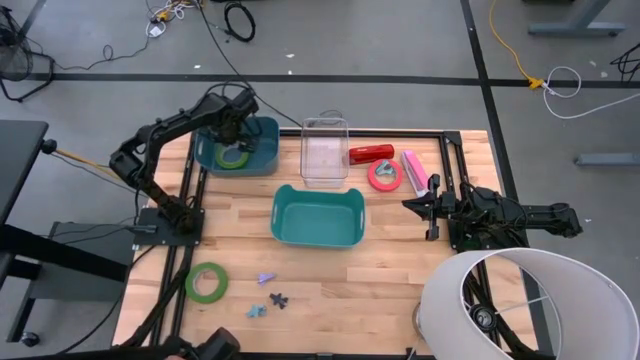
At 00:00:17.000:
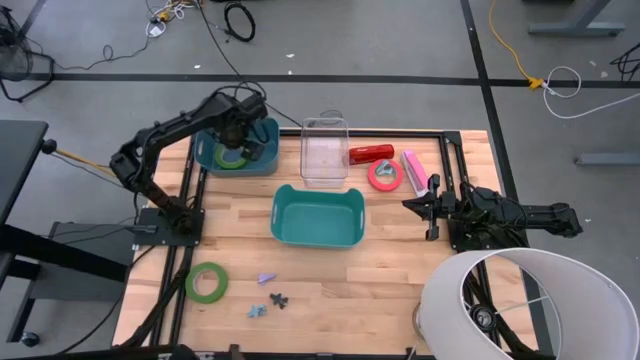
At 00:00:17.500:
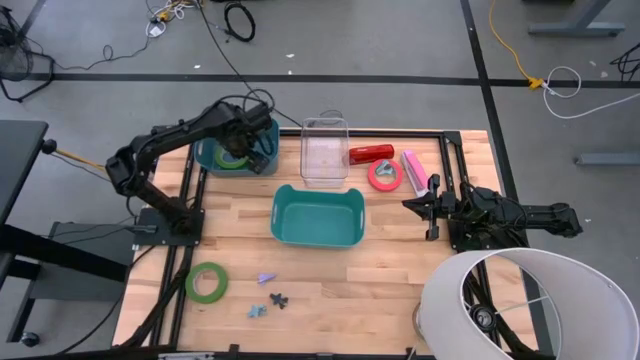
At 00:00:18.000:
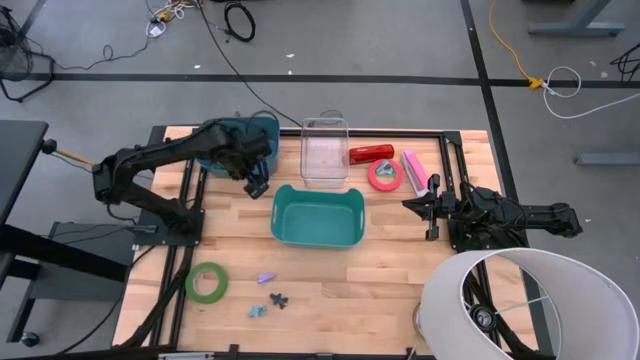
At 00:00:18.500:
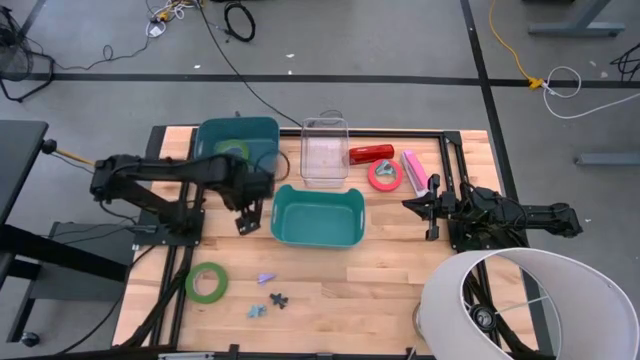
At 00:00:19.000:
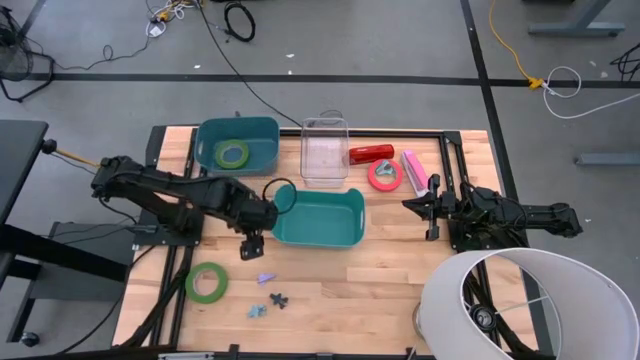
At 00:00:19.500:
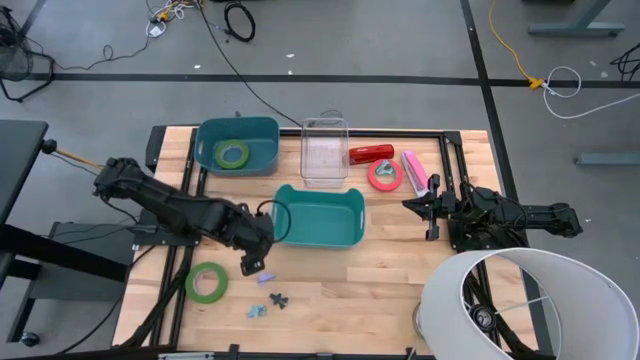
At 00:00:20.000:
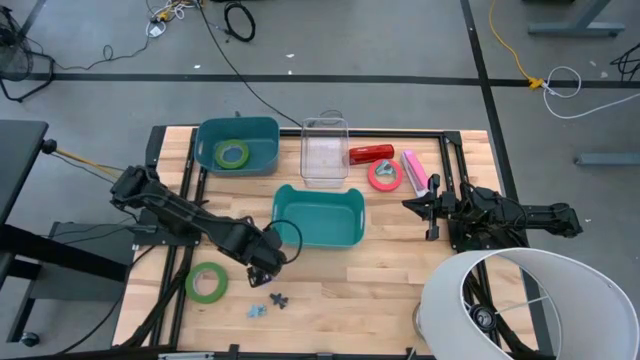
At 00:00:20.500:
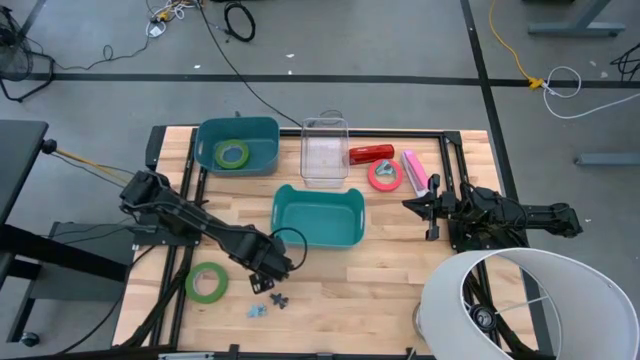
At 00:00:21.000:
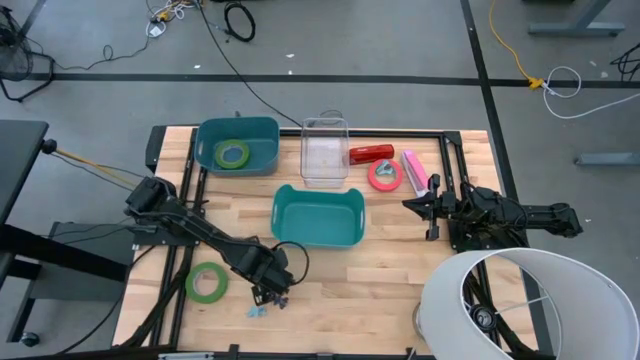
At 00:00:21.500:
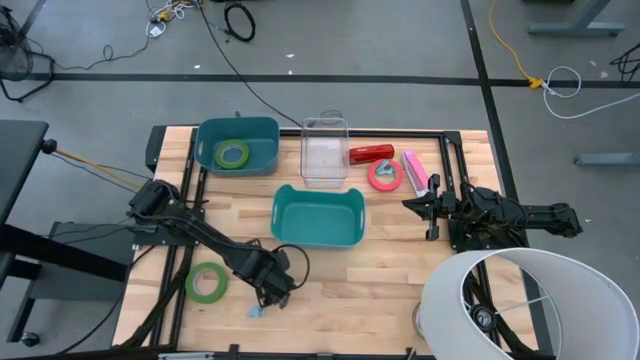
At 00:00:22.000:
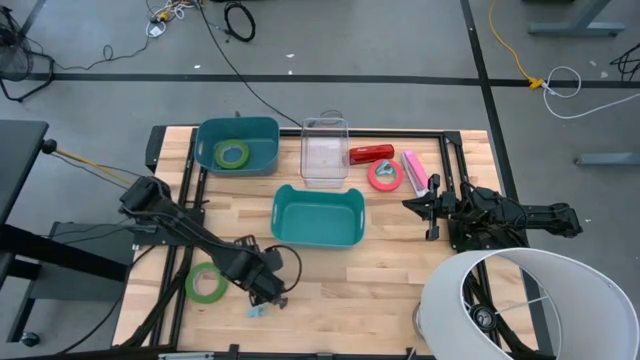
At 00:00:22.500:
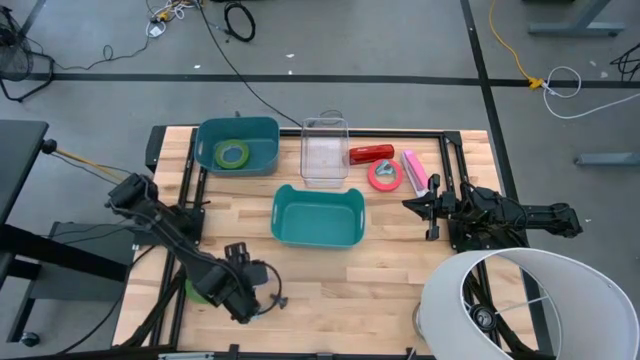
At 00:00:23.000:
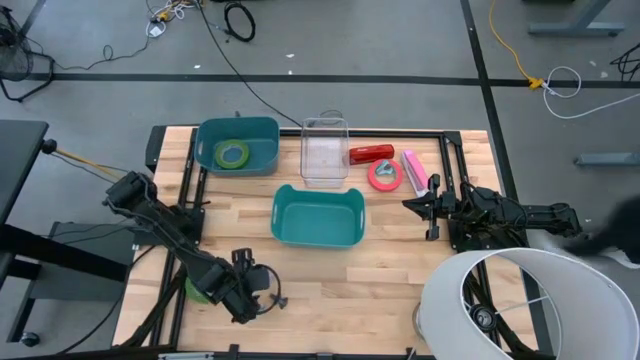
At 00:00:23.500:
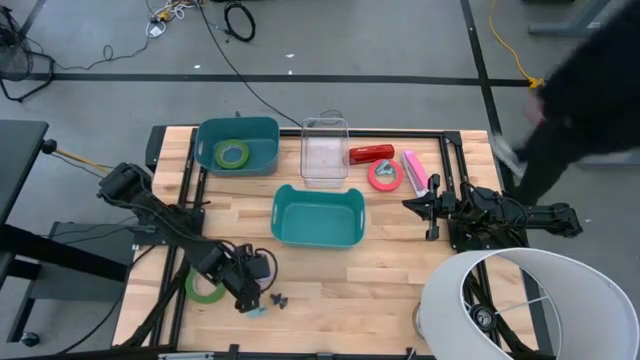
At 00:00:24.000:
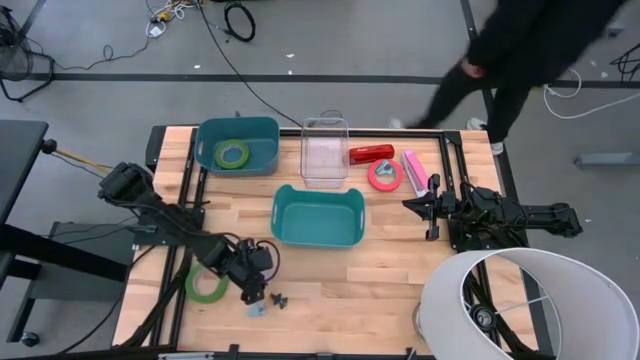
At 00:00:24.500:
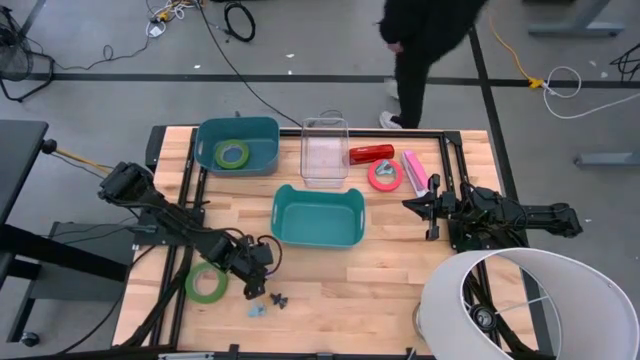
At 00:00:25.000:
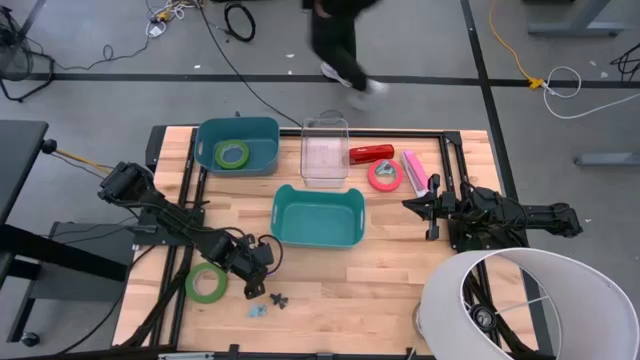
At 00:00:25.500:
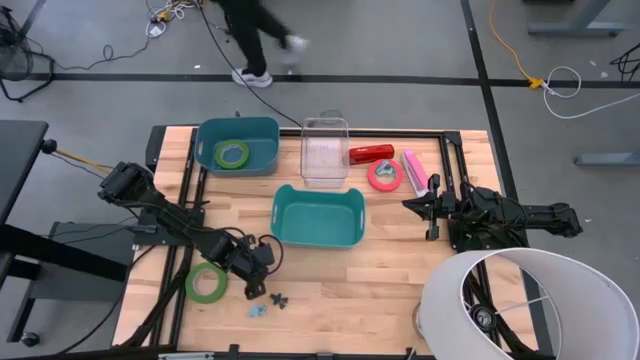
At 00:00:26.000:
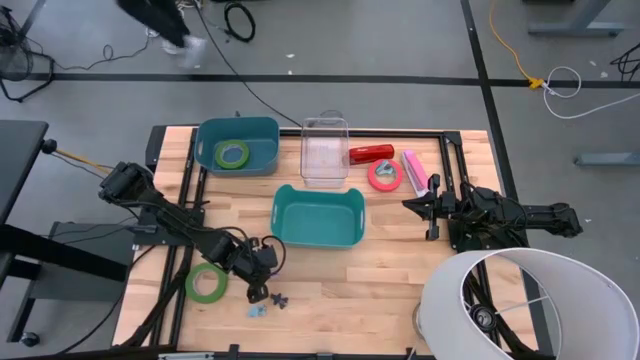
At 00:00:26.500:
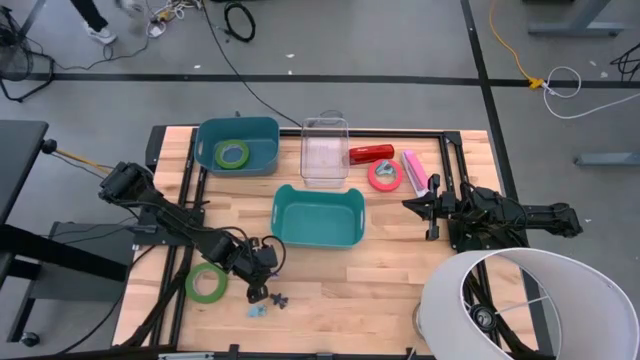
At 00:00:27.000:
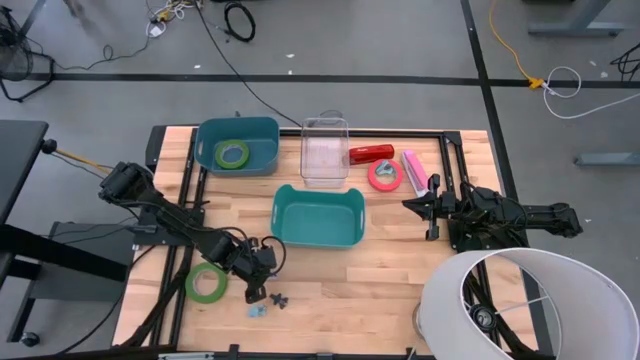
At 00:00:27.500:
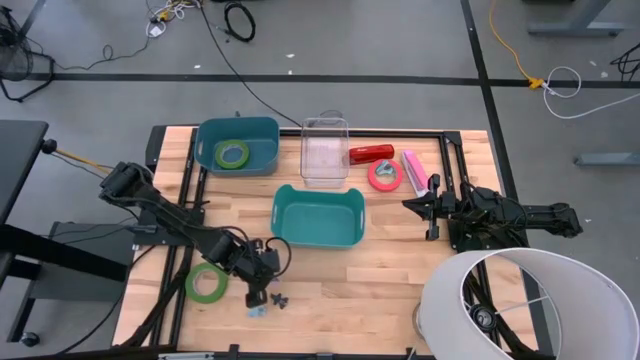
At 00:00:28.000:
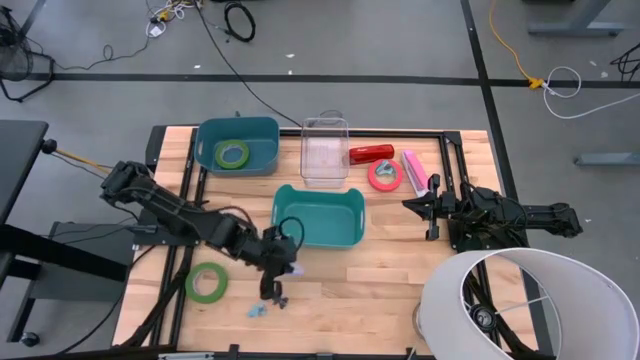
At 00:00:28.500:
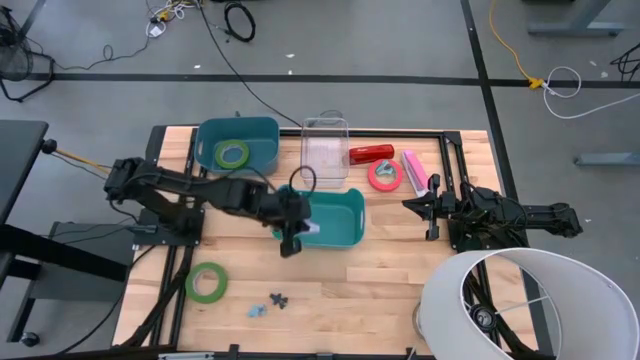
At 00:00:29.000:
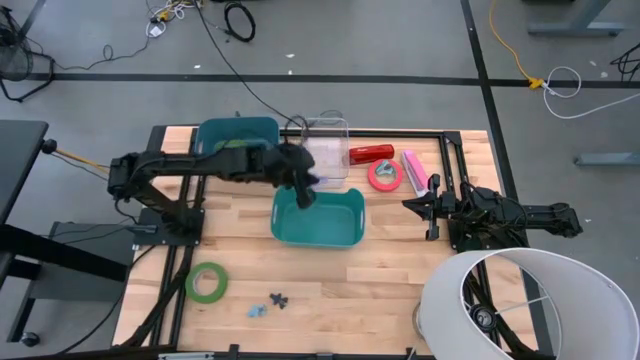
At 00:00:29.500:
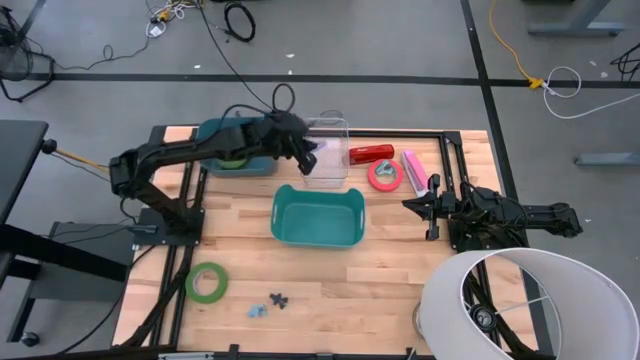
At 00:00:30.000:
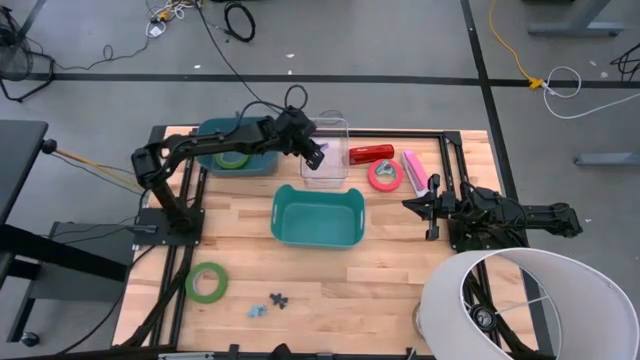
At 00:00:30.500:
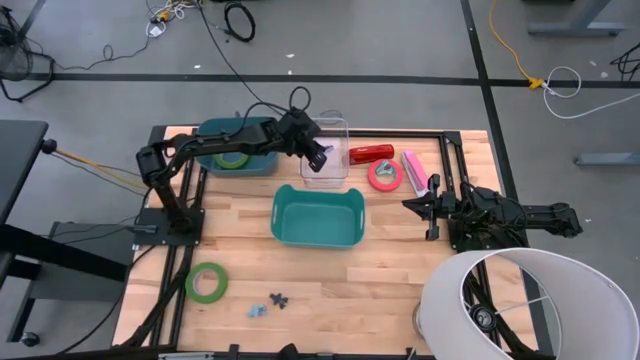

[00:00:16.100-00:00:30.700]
Task: Pick and place Stapler, Stapler remover, tape
Put the violet staple remover into the transparent bin

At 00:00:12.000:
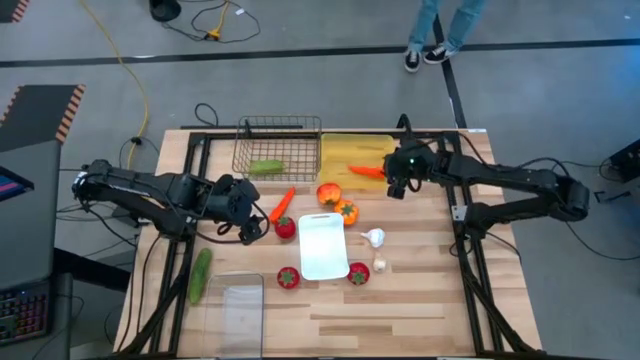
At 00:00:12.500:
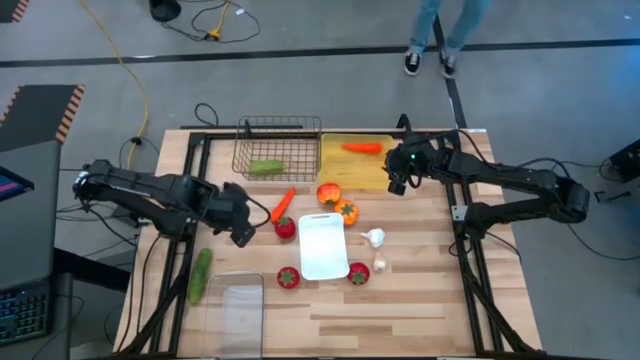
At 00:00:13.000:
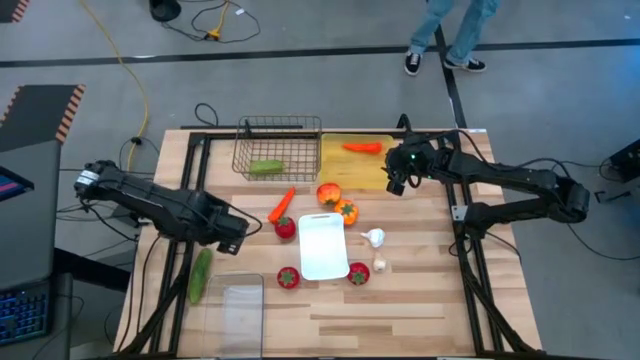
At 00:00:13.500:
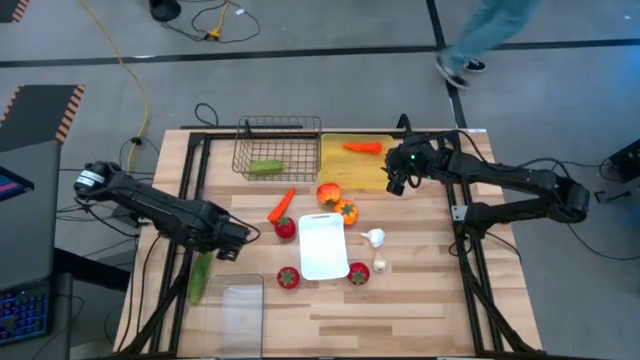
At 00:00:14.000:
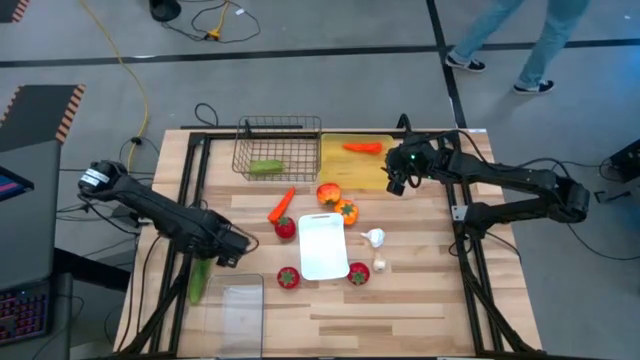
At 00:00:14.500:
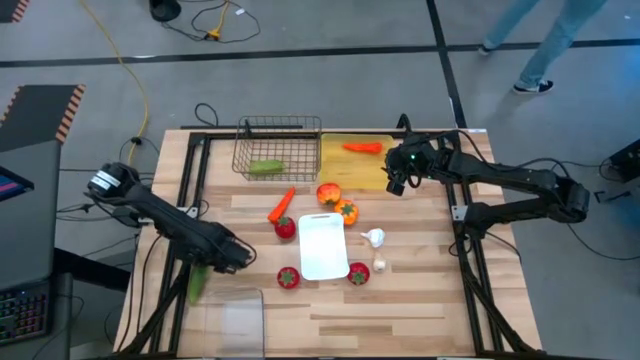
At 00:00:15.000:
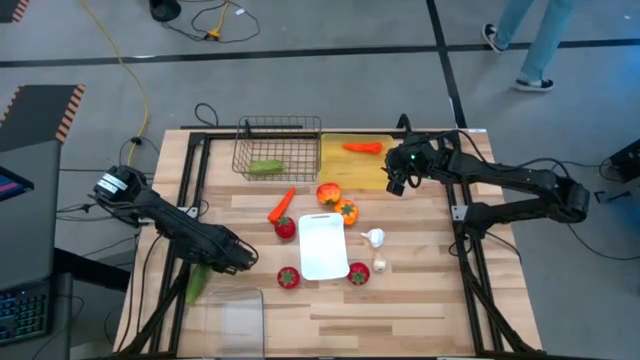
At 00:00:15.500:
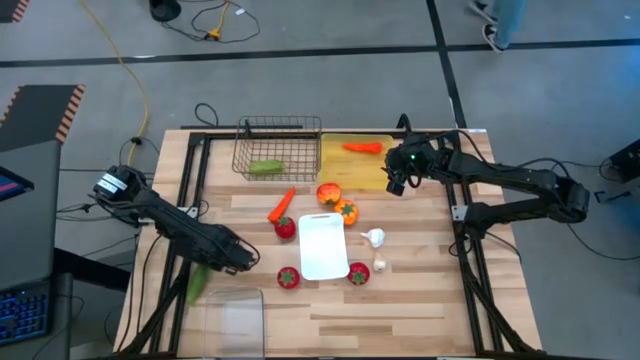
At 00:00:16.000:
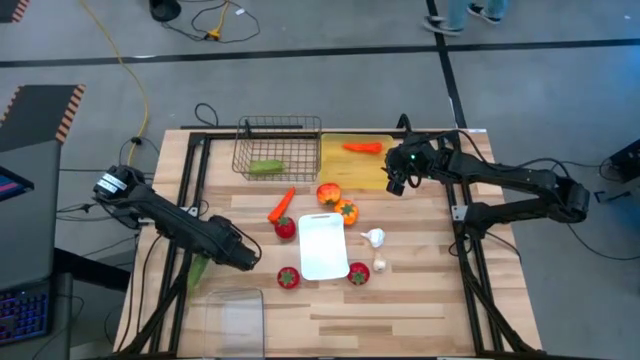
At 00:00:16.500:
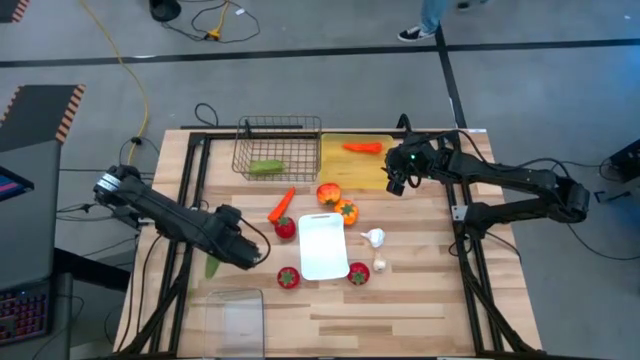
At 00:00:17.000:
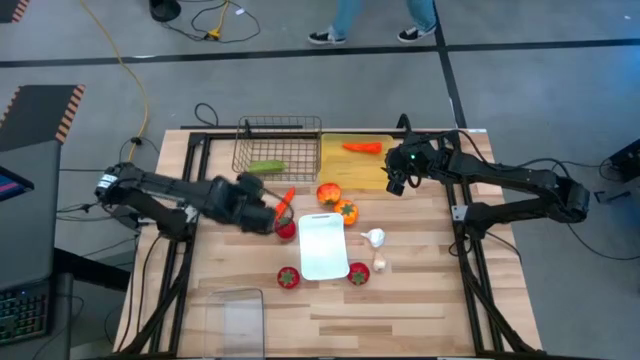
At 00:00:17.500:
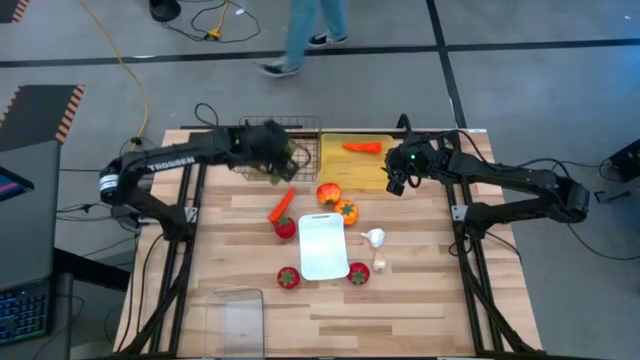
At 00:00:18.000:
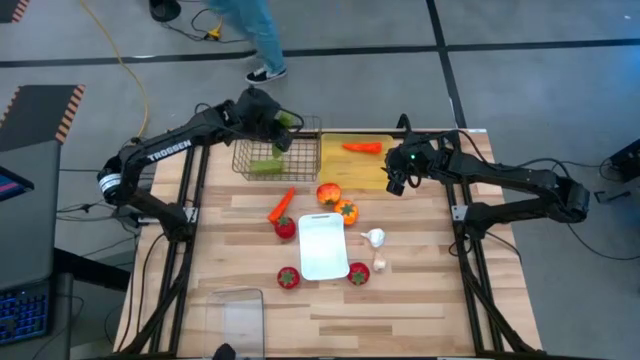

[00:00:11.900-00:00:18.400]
Task: Sort produce into baskets
Put the cucumber into the wire basket
